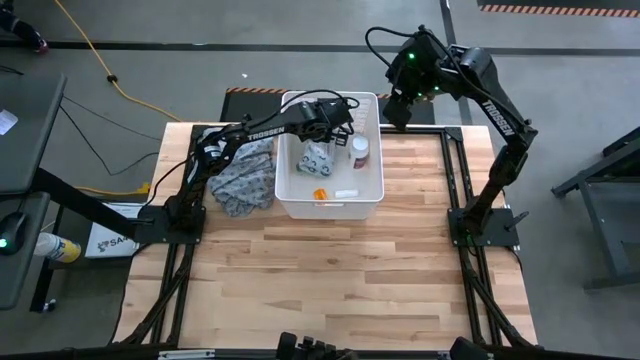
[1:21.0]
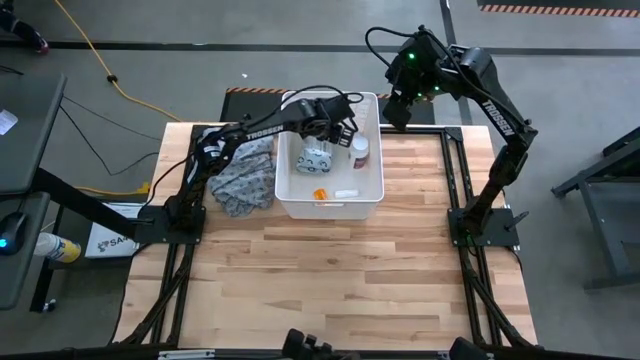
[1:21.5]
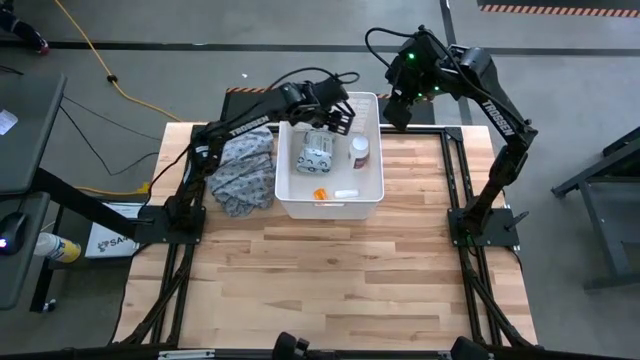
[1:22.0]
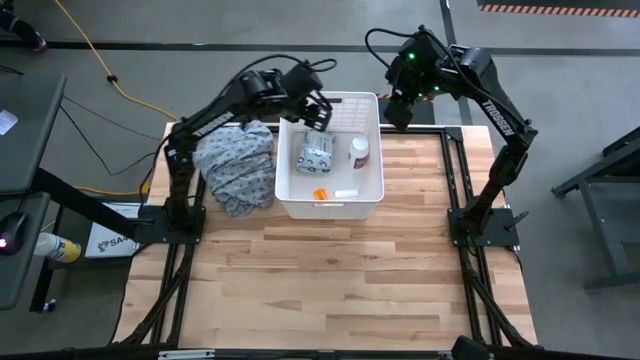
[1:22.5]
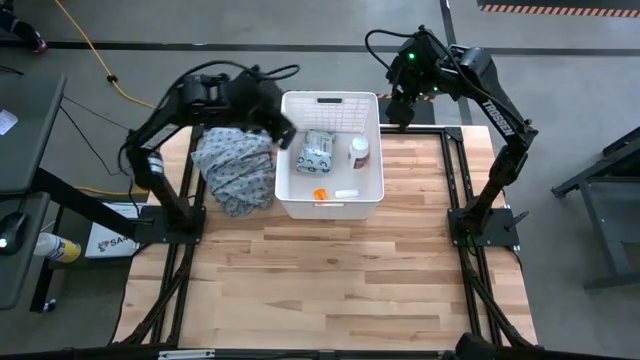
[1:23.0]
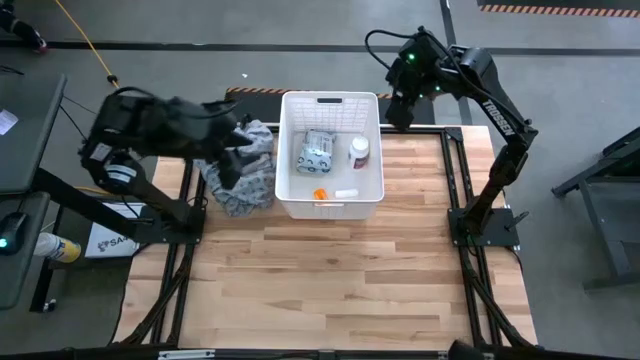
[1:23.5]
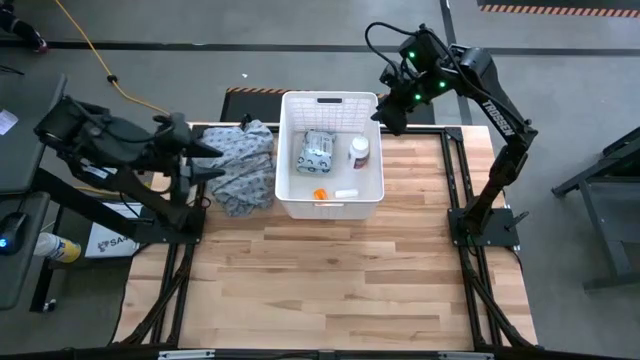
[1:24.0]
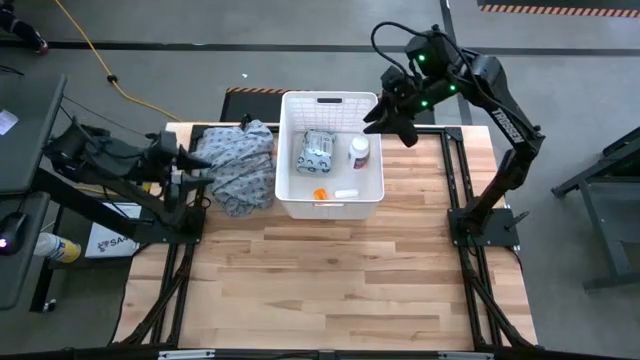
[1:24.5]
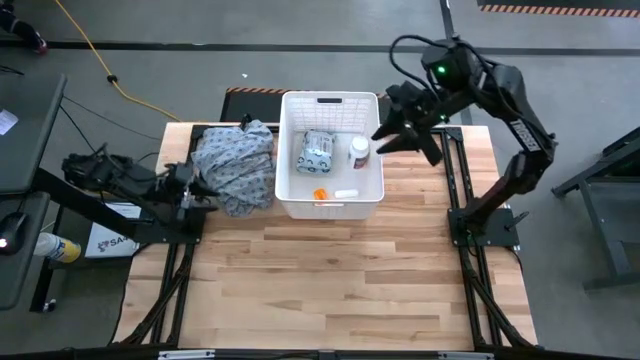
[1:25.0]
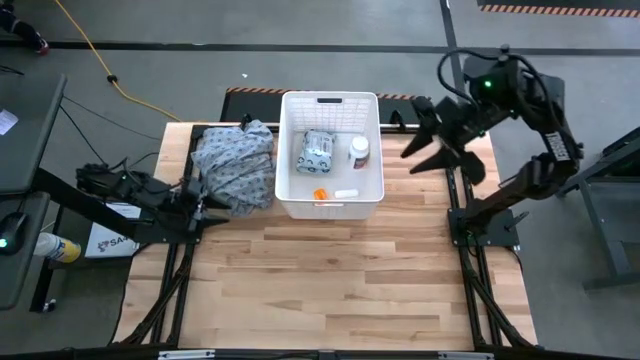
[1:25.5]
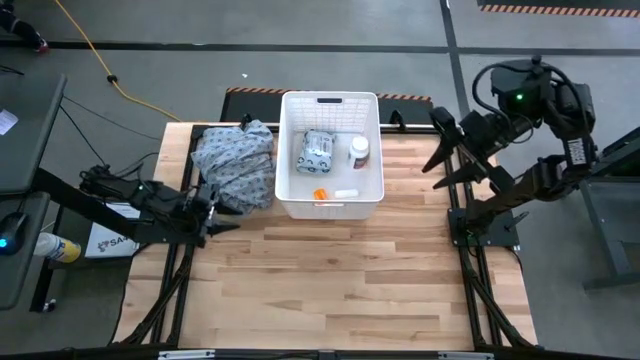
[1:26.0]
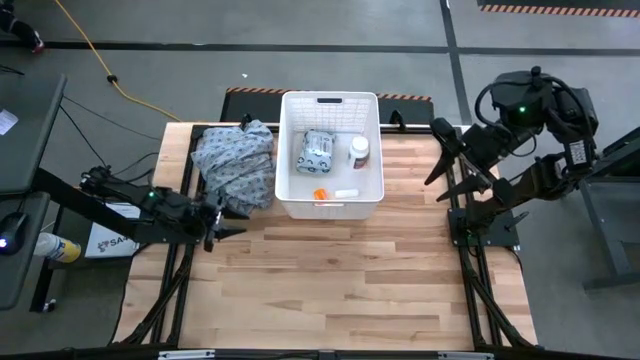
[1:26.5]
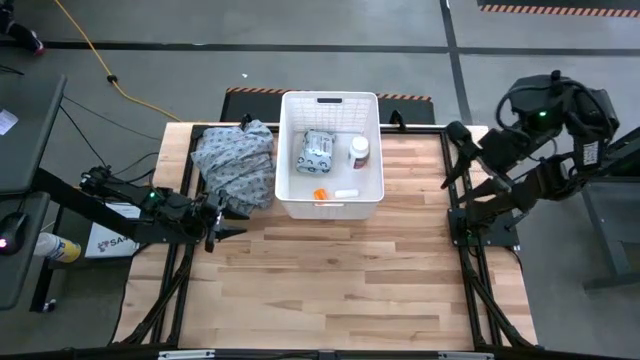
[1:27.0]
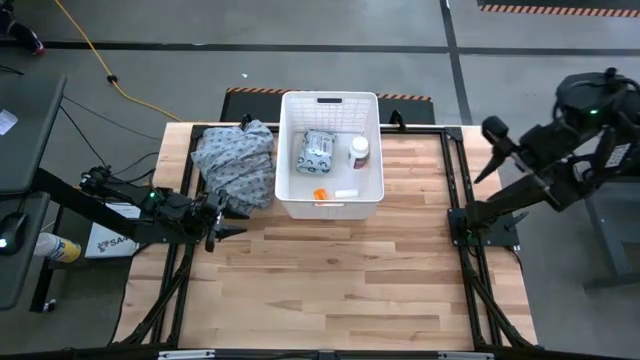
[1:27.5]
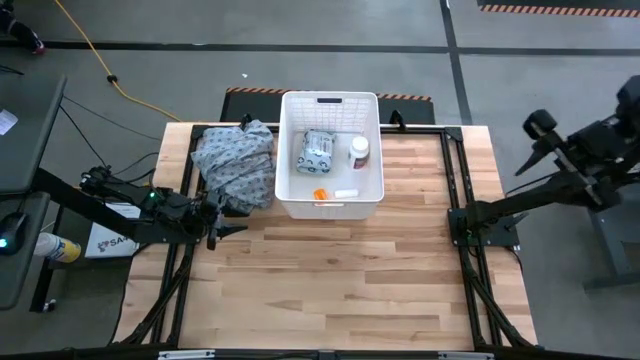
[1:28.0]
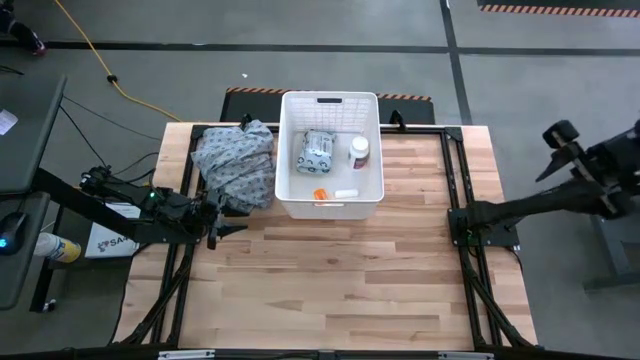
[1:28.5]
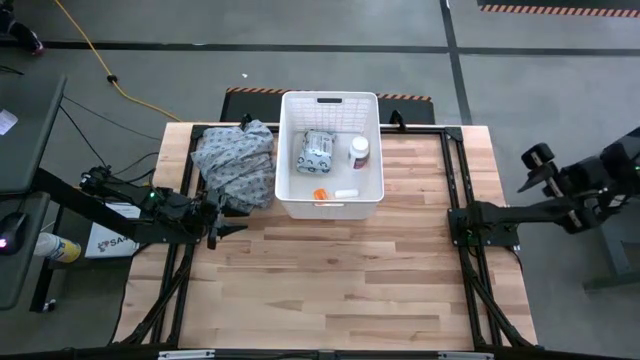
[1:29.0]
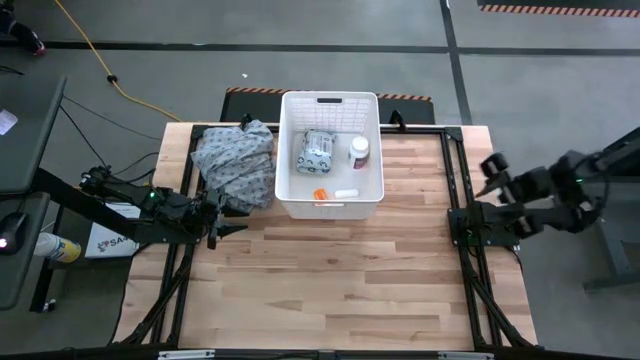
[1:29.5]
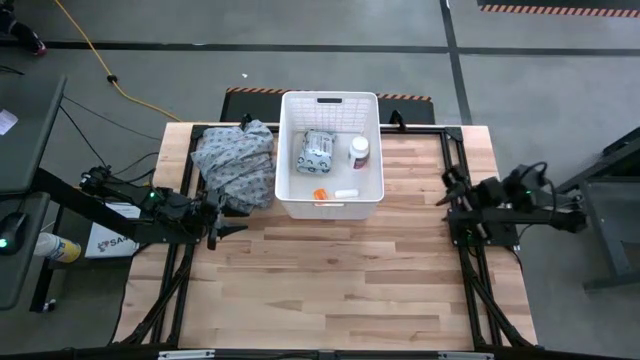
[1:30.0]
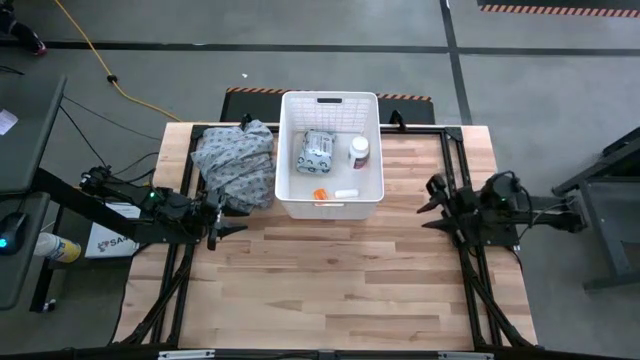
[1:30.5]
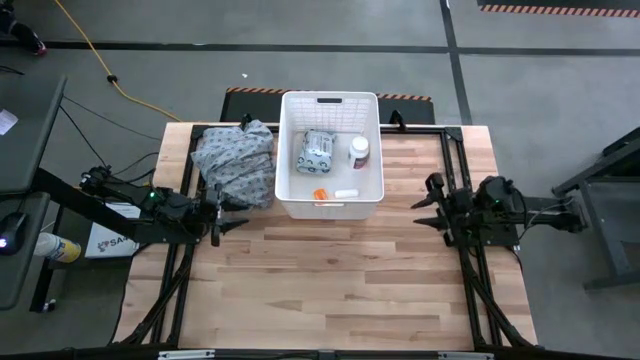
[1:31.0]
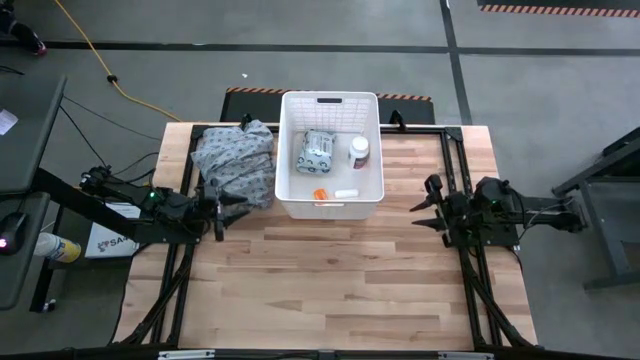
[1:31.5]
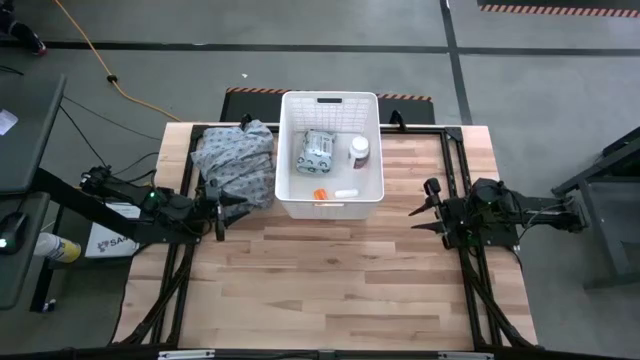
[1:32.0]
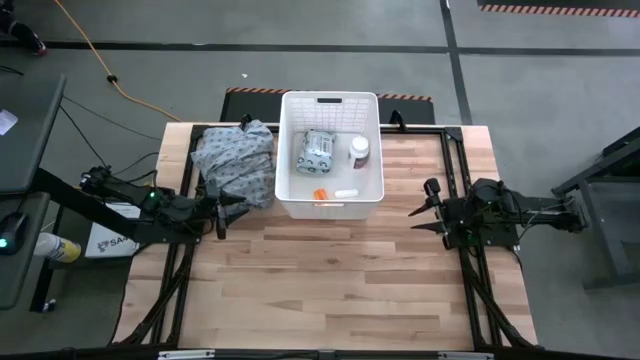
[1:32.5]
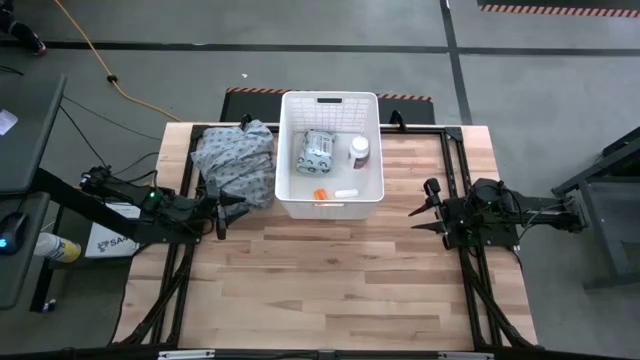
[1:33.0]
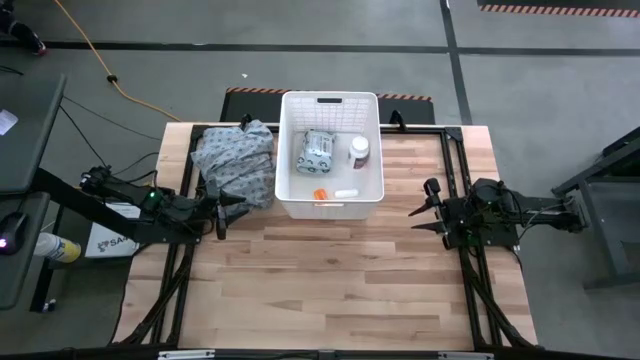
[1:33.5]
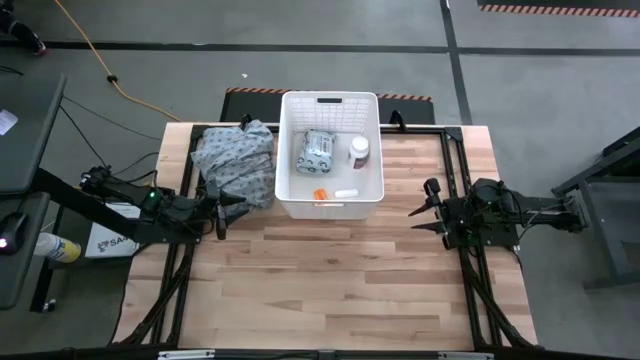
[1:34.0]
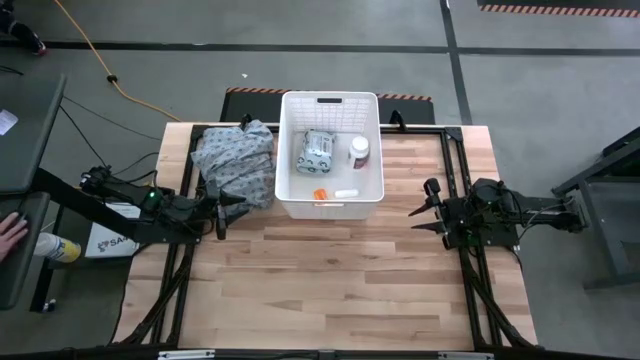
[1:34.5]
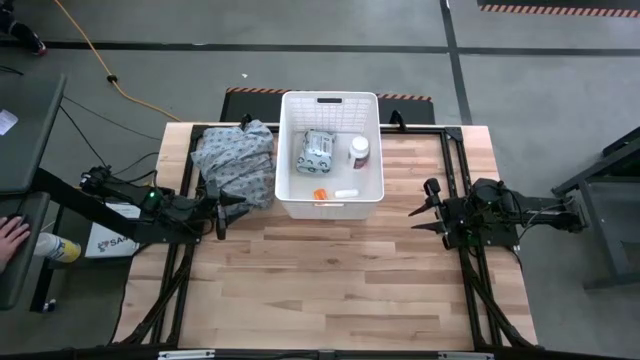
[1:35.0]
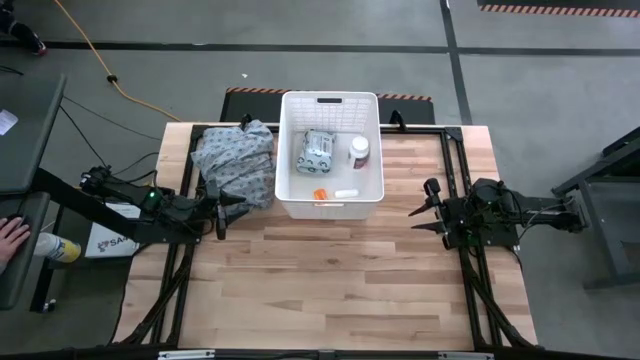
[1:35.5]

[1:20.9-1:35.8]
Task: Pick & place medical supplies in basket/bin
Return to Home Position

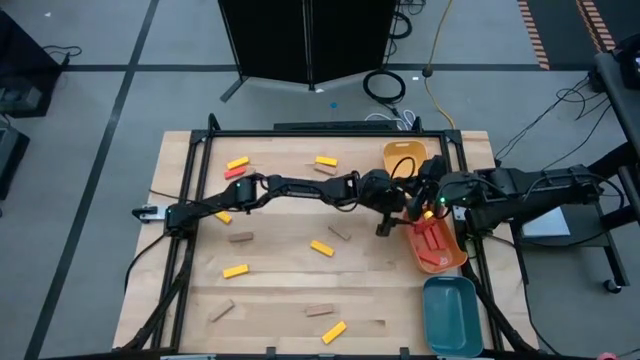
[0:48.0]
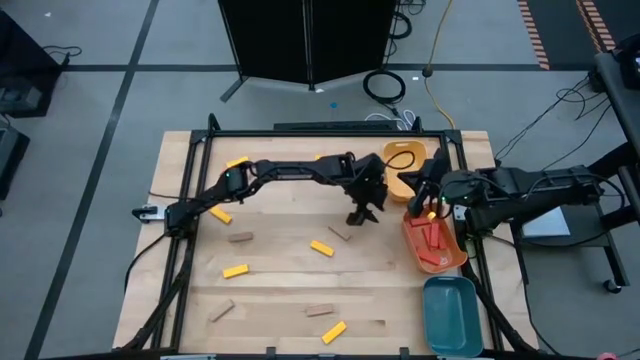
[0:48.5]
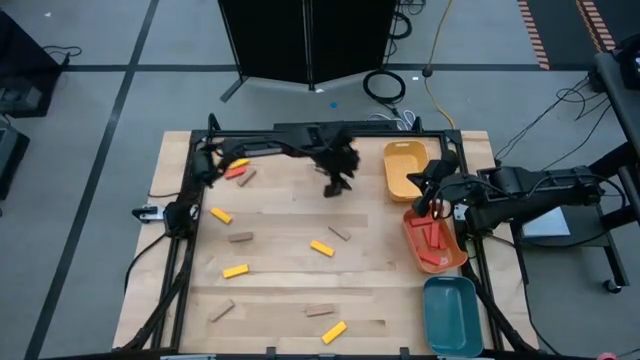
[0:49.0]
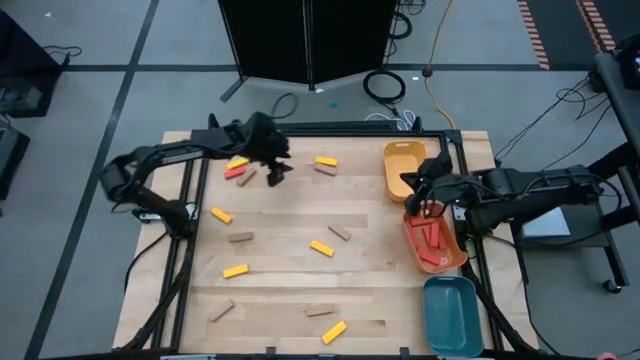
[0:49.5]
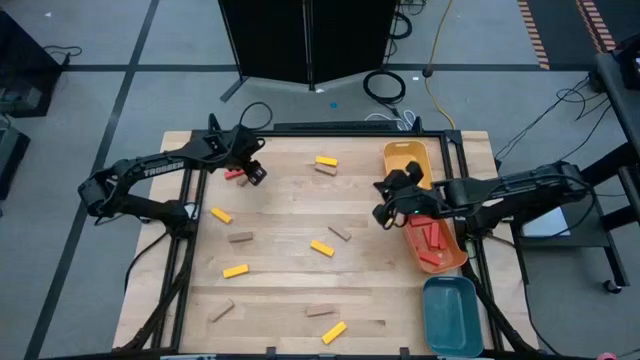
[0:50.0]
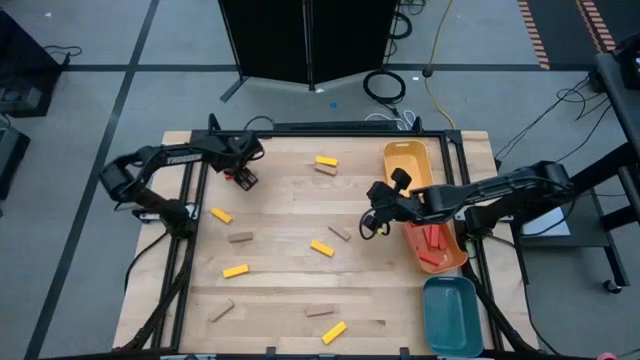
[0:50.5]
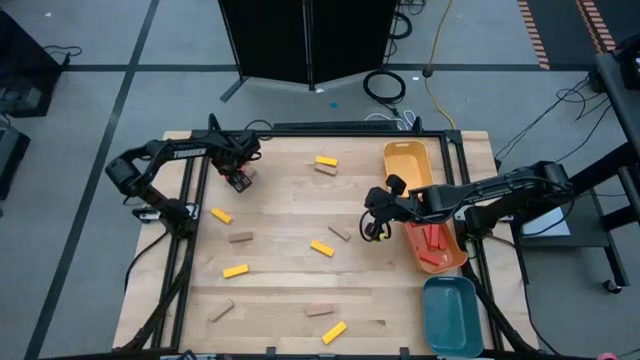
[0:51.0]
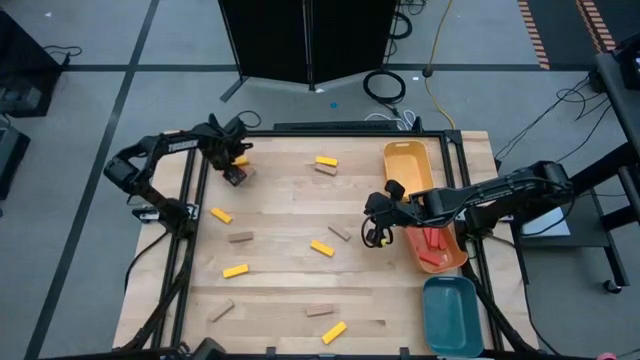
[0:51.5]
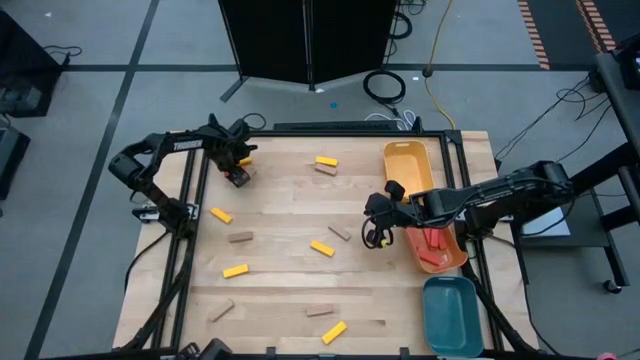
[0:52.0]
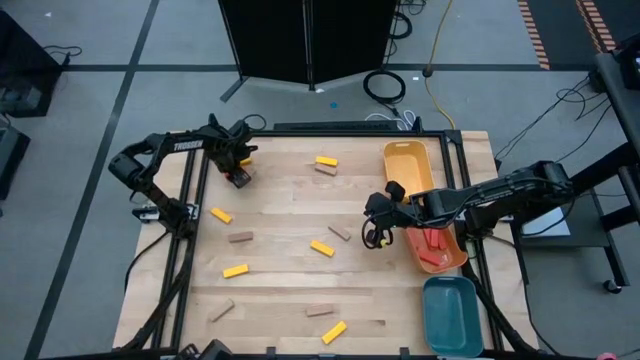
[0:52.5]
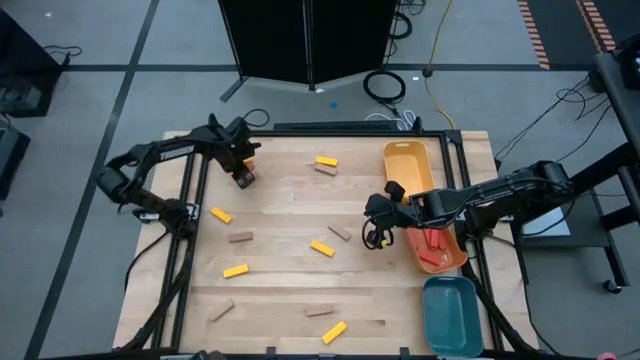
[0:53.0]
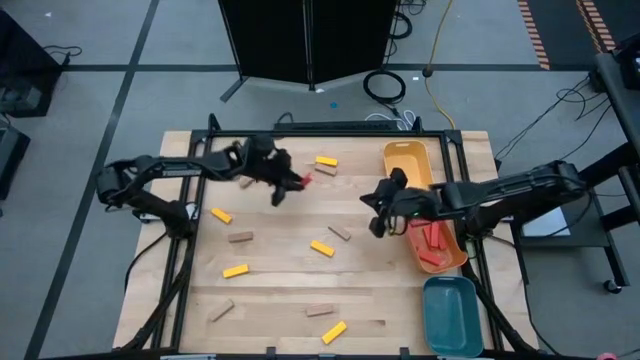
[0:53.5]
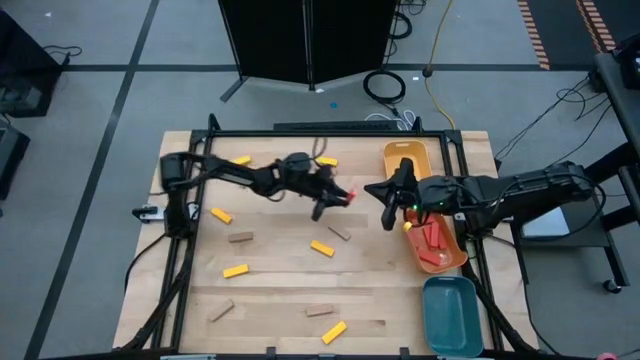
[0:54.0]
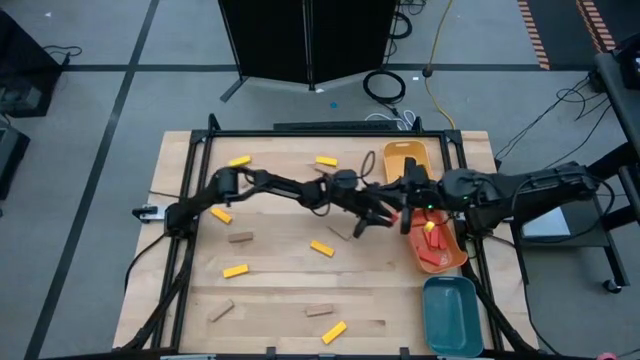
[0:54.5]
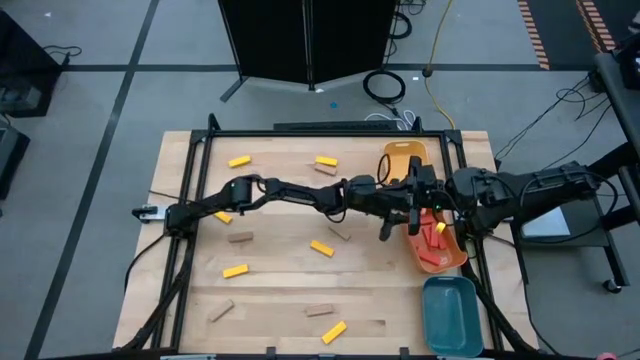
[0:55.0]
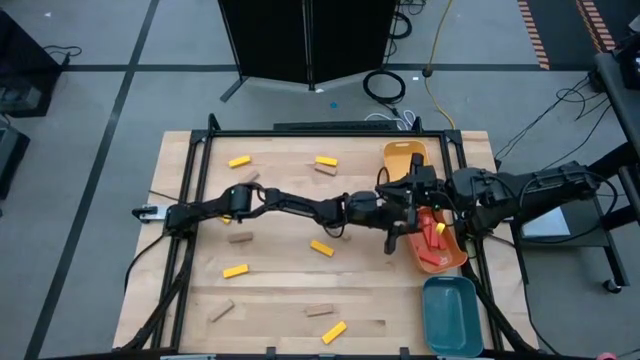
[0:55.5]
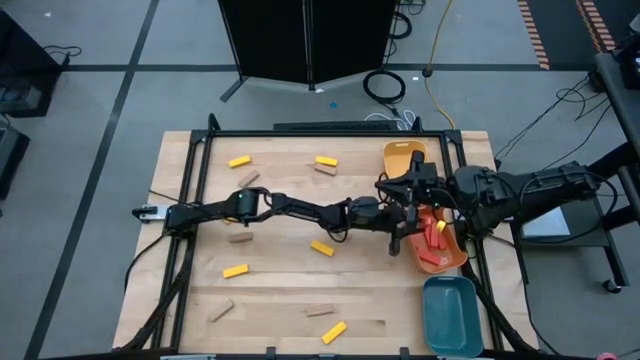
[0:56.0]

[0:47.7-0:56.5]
Task: Sort blocks
Put the red block into the orange bin
